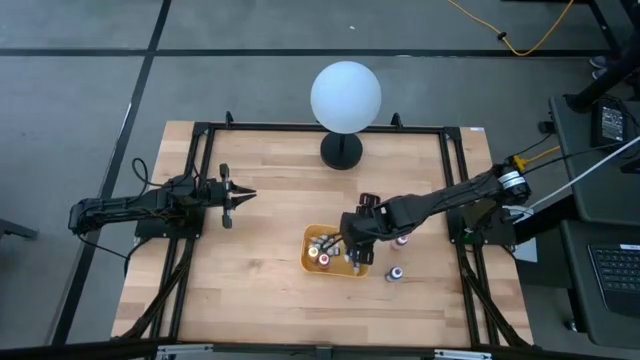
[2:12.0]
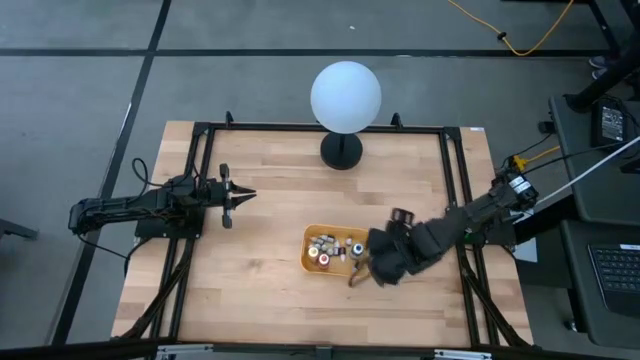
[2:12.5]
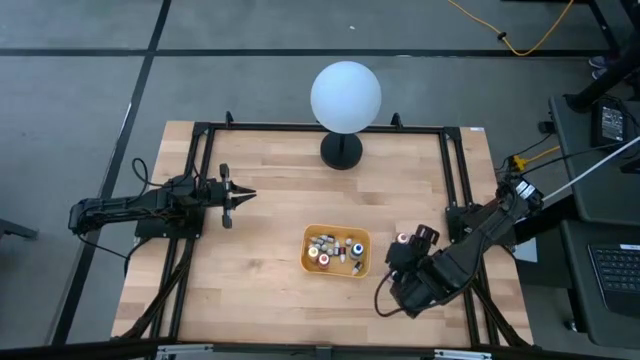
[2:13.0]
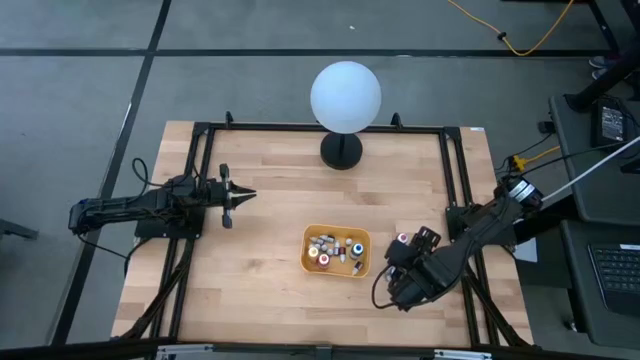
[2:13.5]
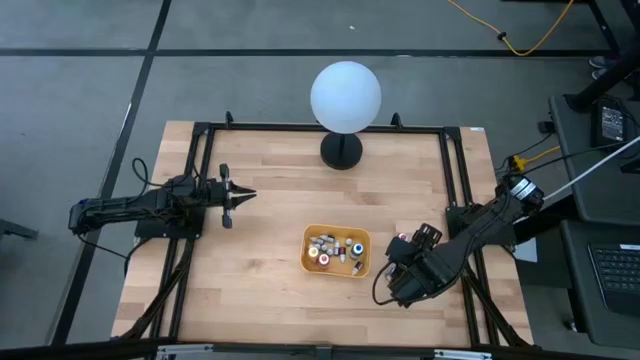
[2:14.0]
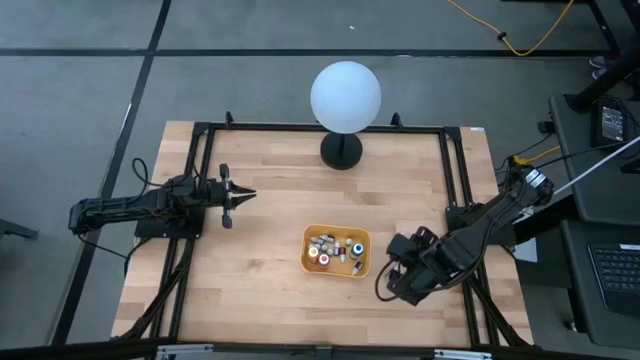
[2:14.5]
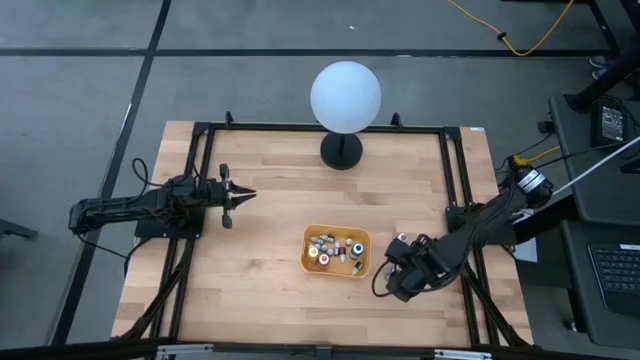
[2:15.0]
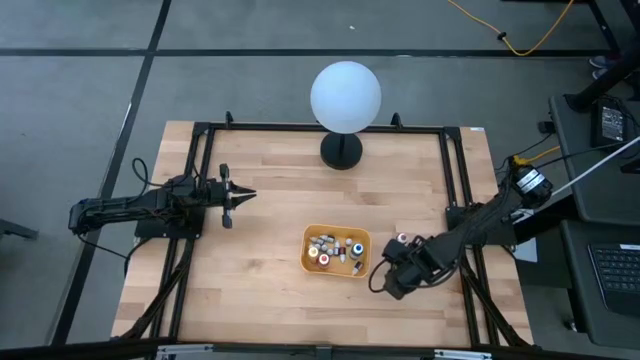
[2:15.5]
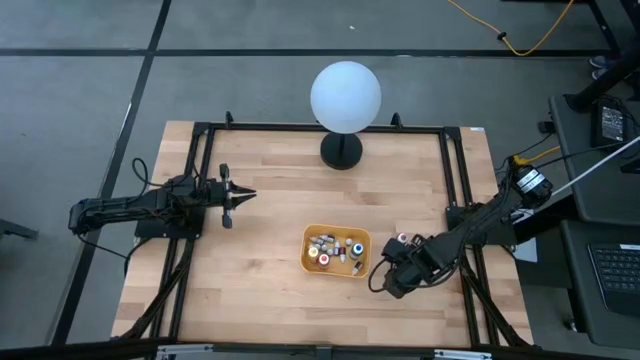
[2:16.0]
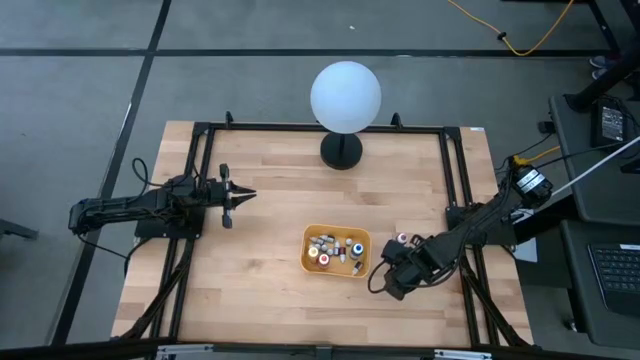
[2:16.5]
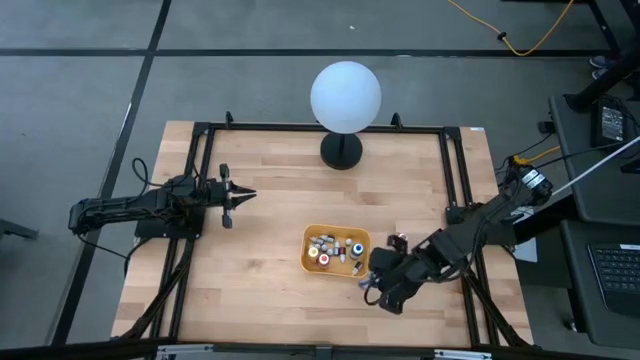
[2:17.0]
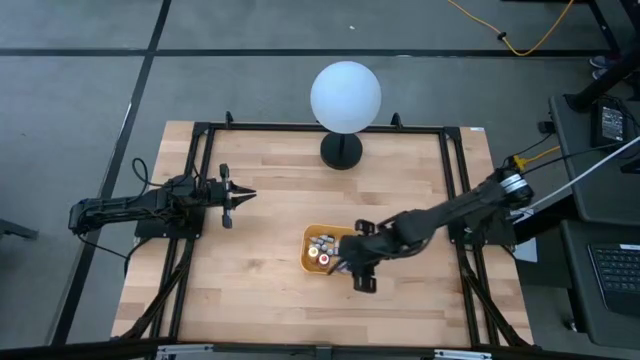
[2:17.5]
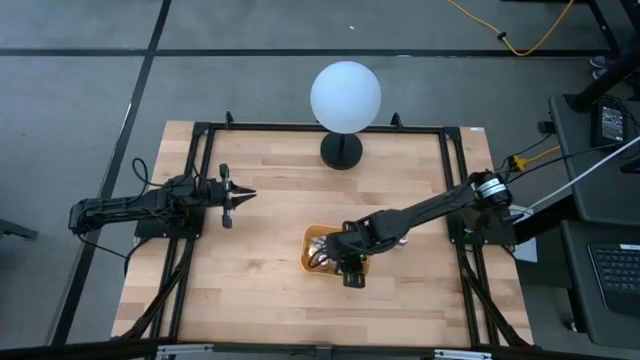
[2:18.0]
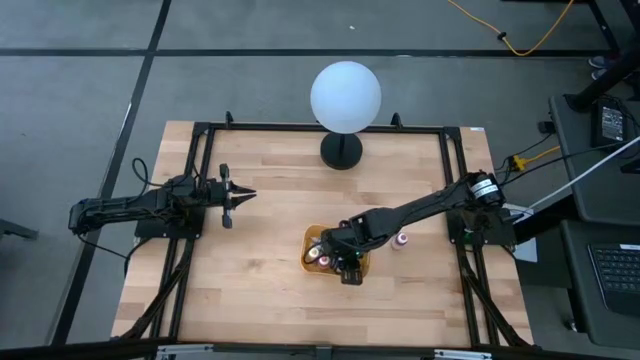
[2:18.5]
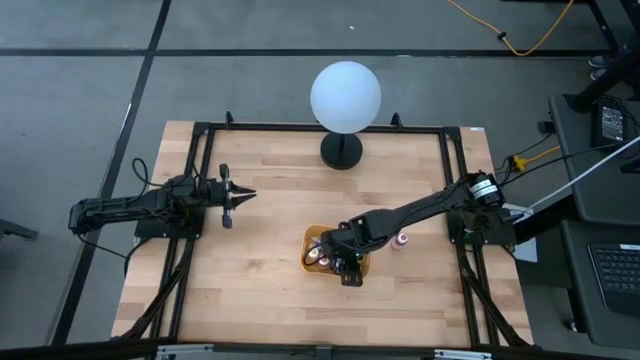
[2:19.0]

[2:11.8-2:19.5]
Task: Pick & Place food coloring
Put the large purple food coloring bottle into the yellow bin

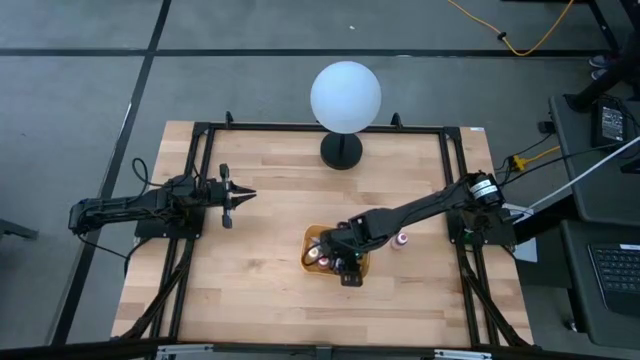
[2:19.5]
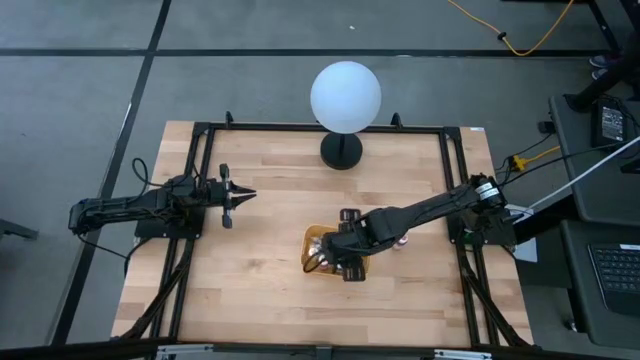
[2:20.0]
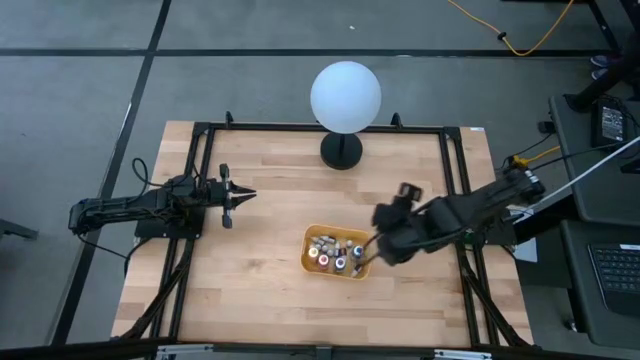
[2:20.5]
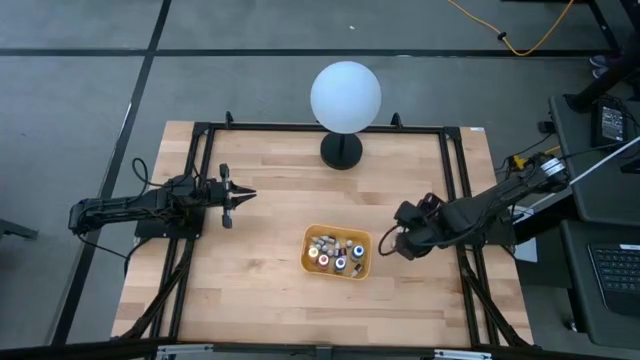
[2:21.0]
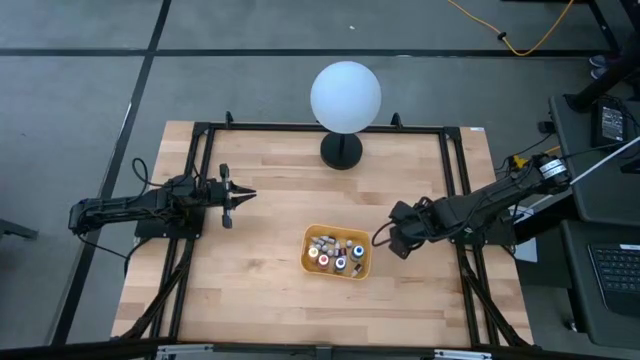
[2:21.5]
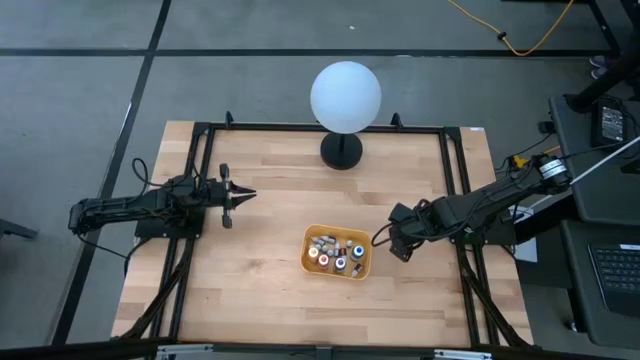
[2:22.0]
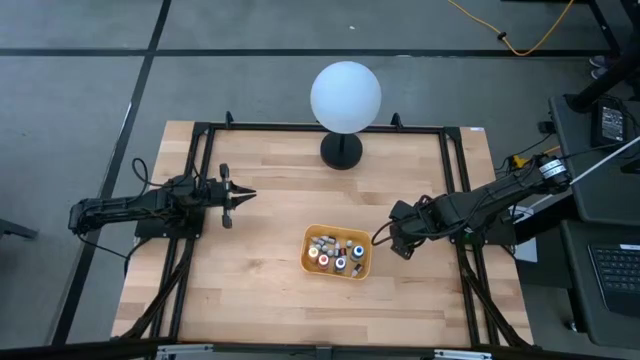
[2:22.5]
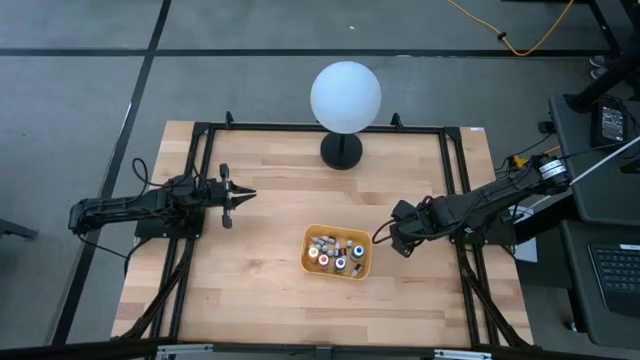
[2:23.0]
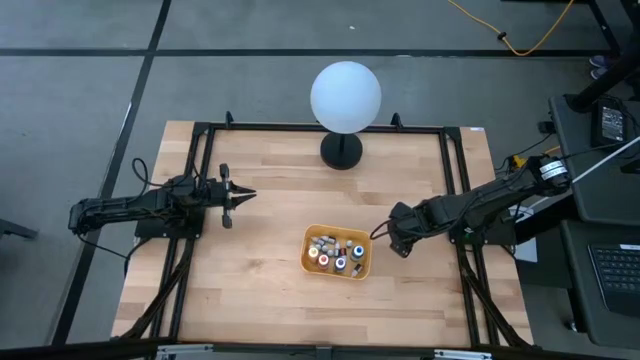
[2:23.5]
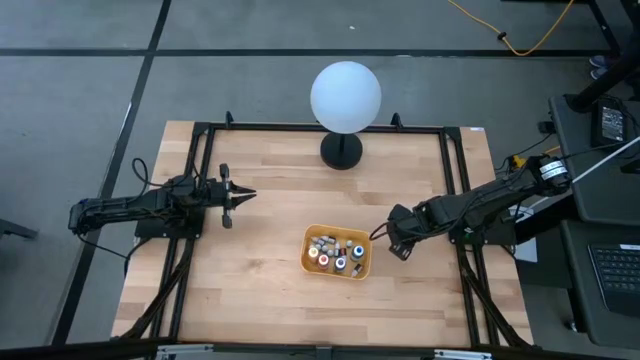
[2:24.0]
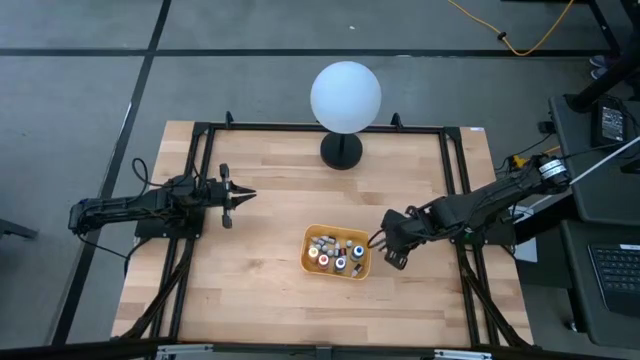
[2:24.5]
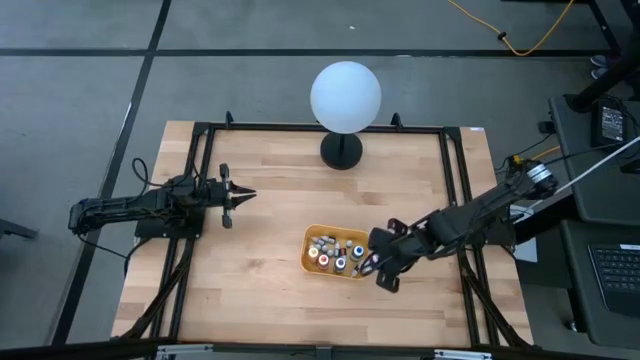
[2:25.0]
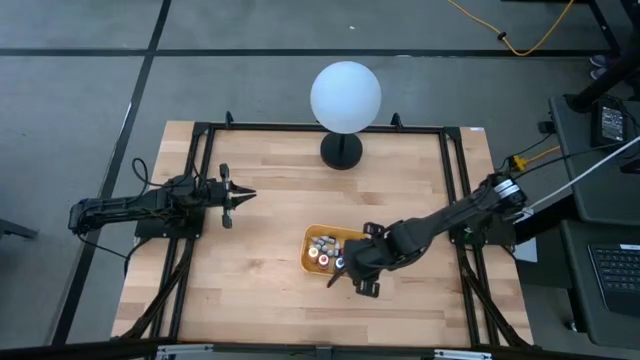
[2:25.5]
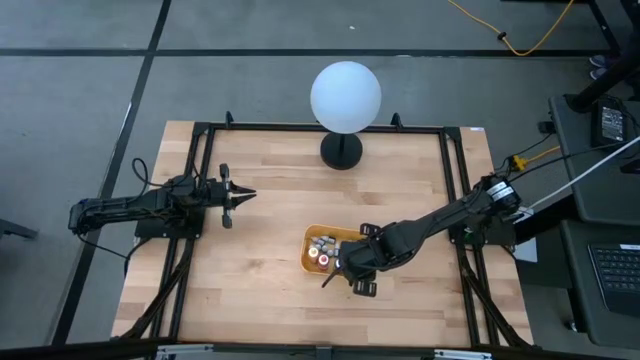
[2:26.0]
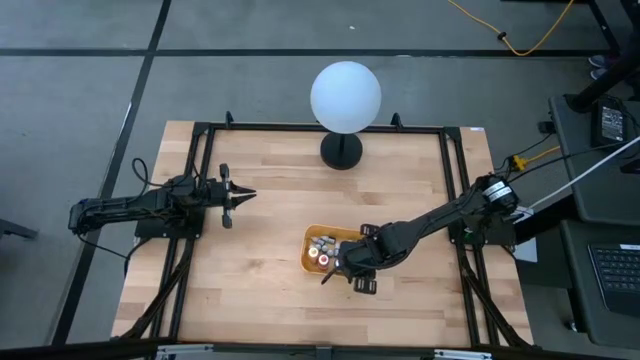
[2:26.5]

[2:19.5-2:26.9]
Put the large pink food coloring bottle into the yellow bin

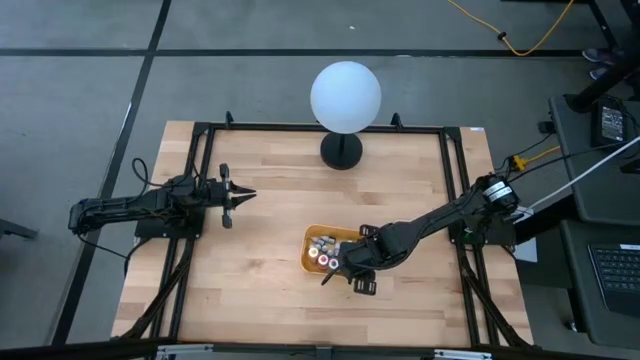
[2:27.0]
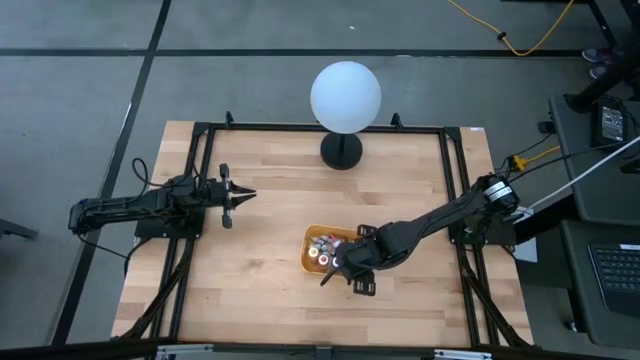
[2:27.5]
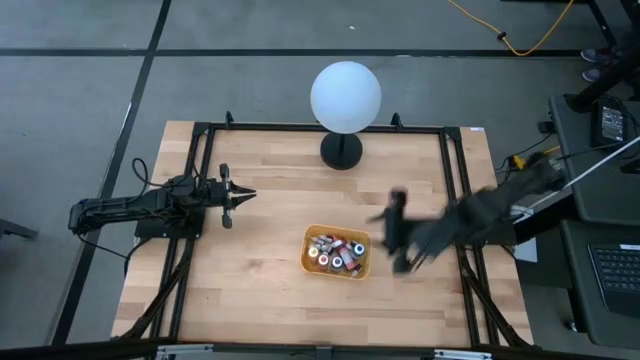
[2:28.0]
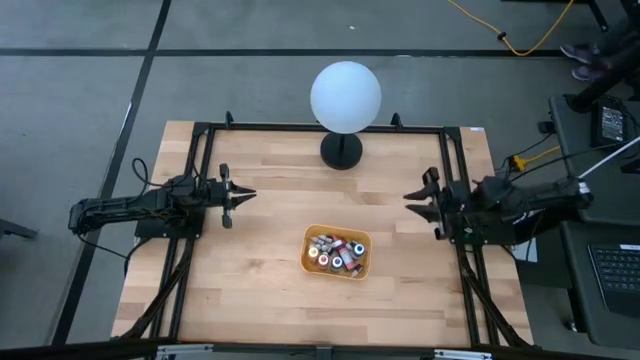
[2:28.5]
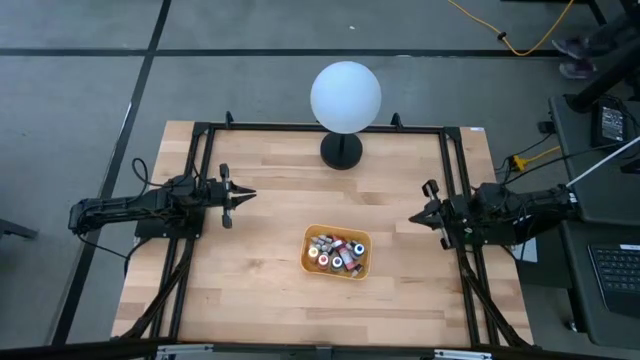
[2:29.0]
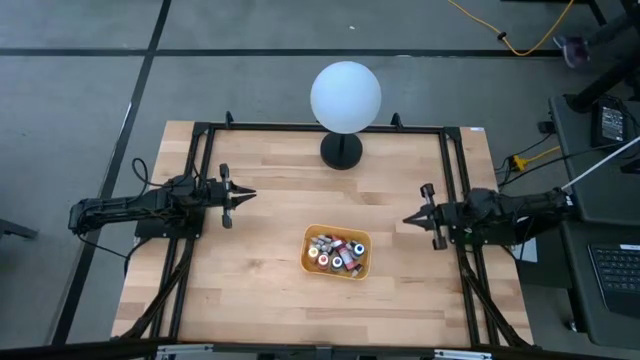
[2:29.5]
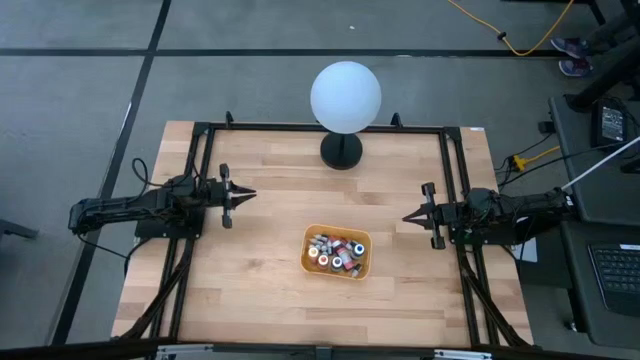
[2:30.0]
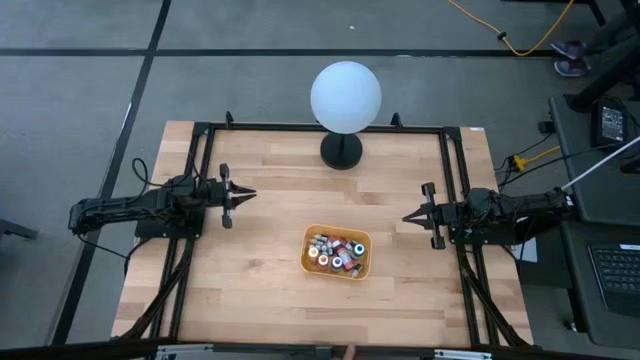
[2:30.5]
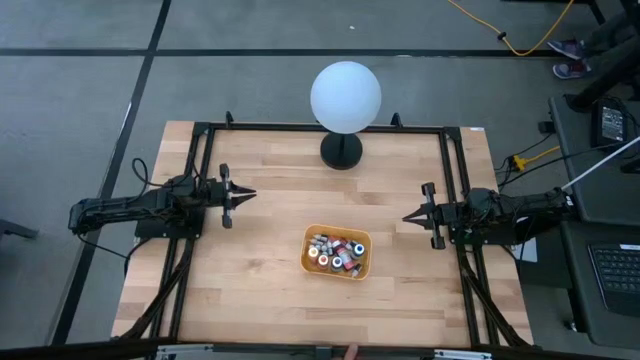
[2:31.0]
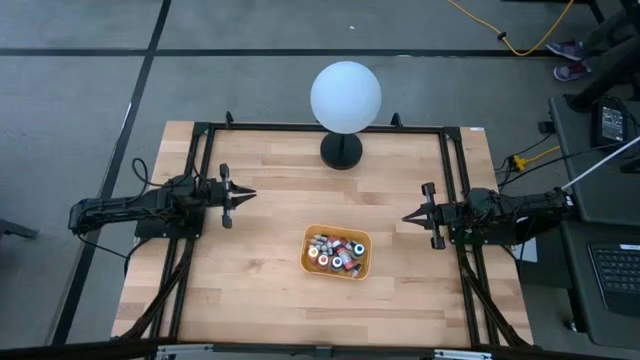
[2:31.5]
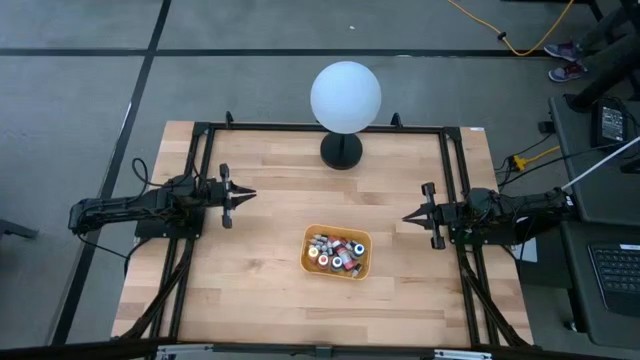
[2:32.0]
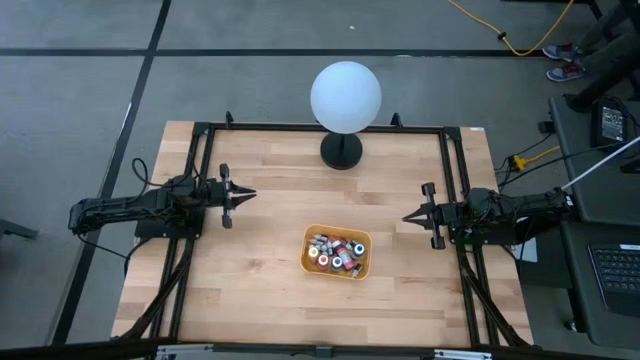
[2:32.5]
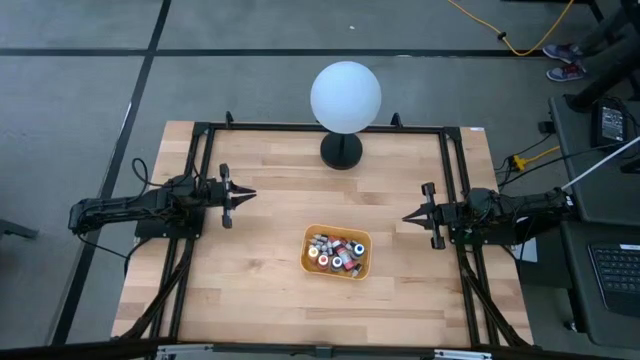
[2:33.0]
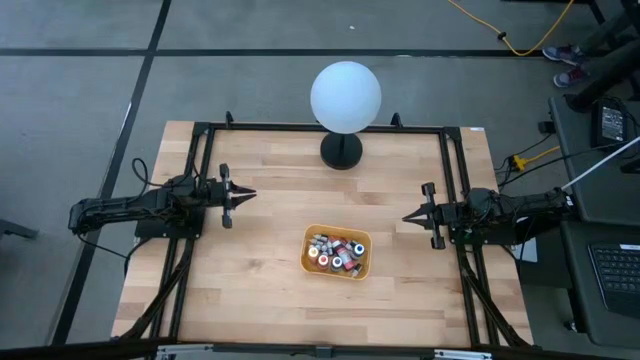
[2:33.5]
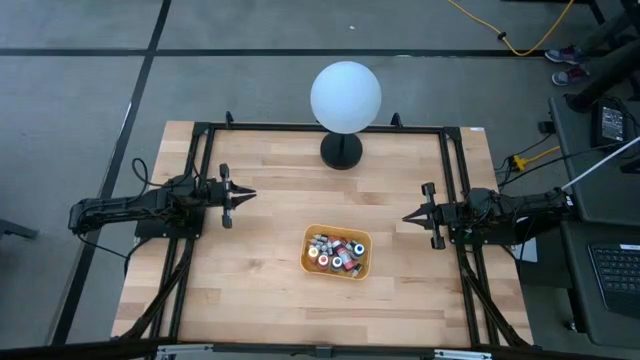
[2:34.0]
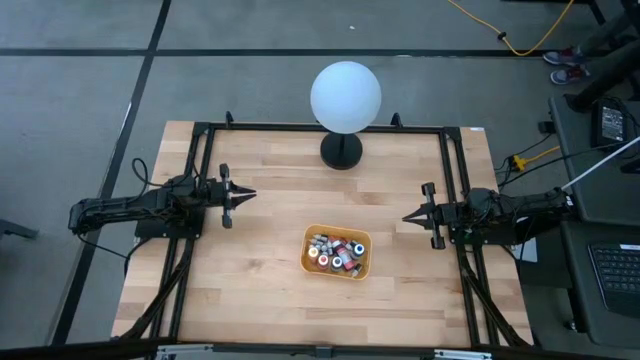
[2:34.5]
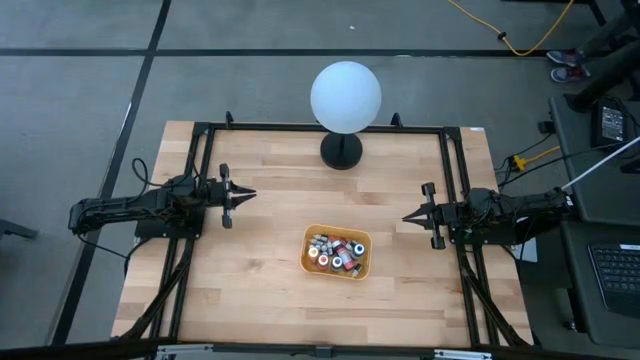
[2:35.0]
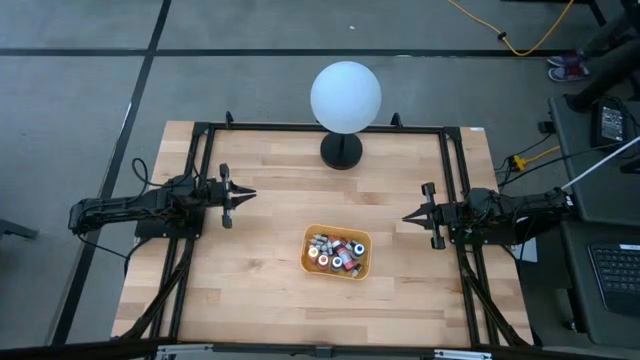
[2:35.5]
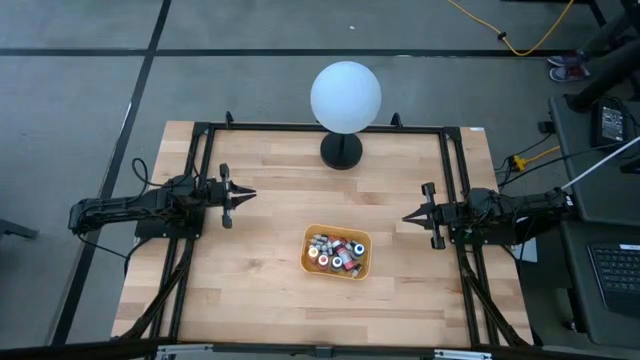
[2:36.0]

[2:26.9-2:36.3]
Return to Home Position
